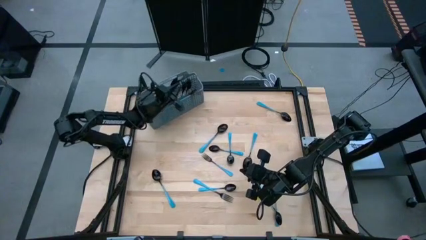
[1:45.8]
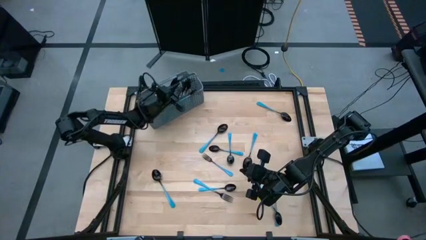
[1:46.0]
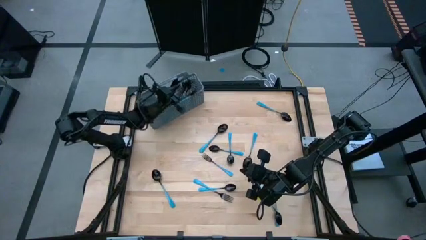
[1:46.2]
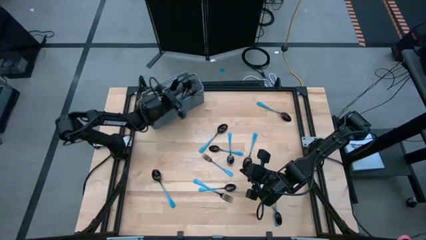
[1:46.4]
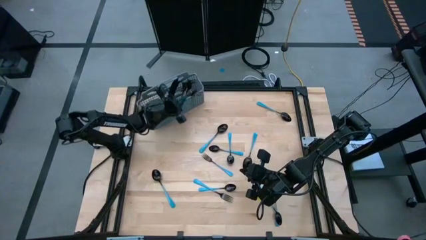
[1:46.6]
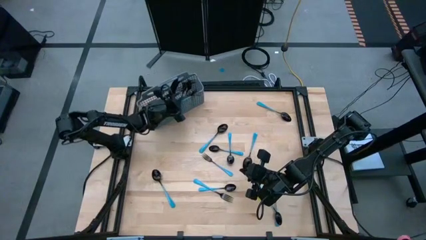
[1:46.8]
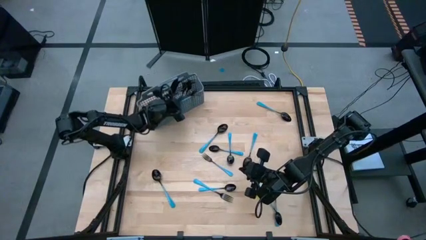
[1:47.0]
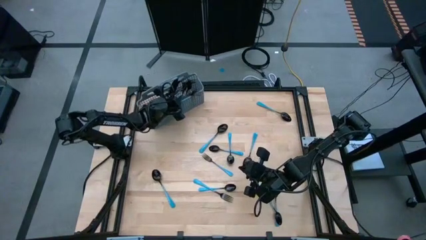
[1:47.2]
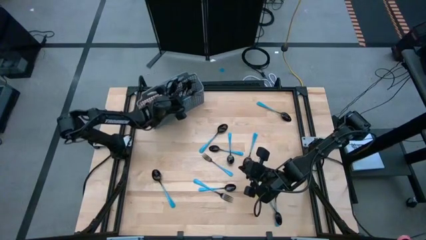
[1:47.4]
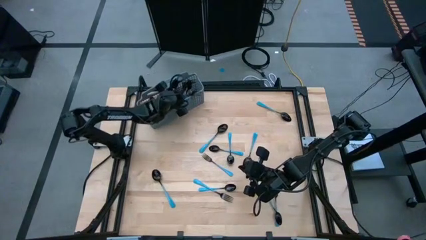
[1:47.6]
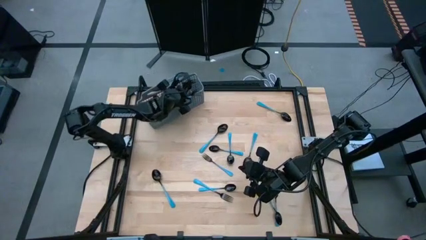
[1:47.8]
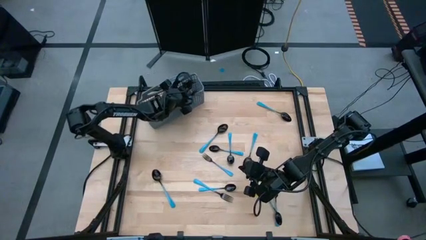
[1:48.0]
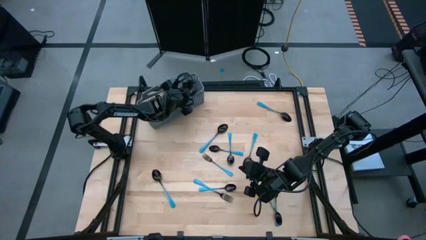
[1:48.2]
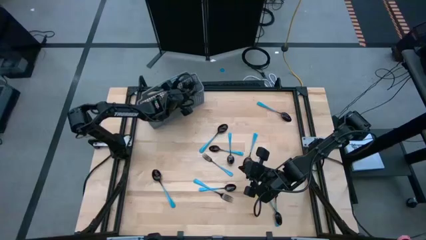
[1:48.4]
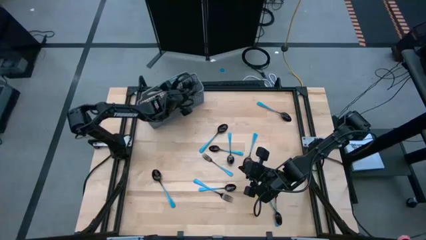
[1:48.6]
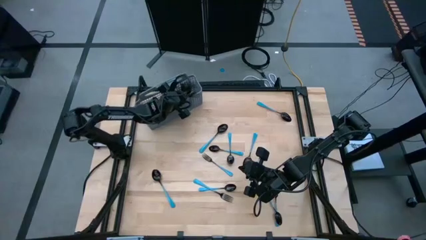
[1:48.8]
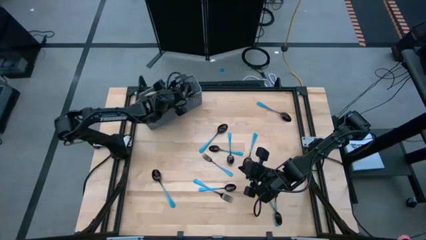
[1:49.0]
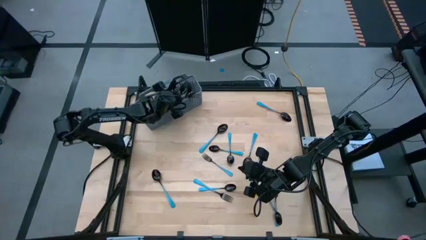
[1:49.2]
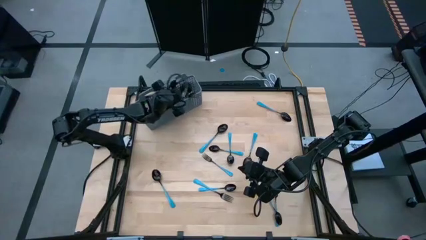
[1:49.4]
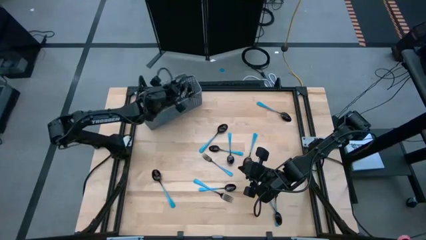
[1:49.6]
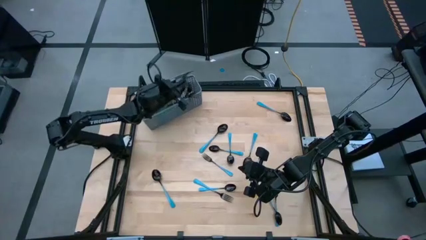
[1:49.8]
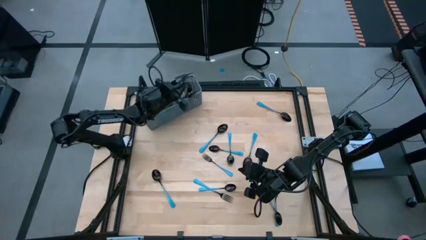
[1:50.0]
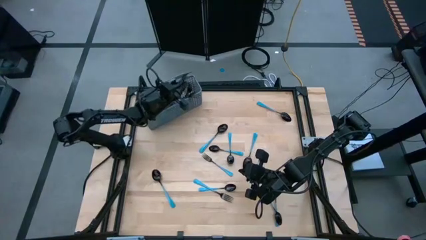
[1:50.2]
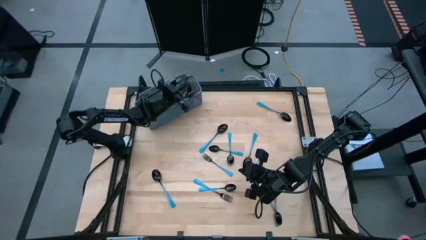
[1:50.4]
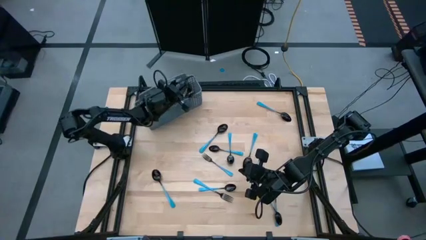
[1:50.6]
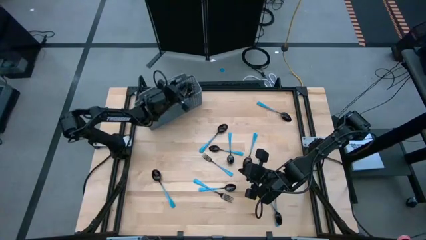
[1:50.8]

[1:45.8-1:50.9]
Task: Sort silverware
Put the blue fork in the silverware rack

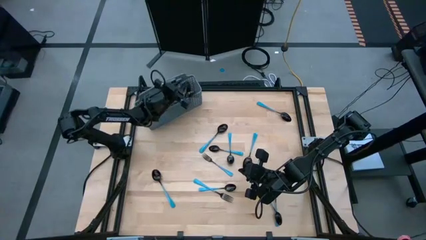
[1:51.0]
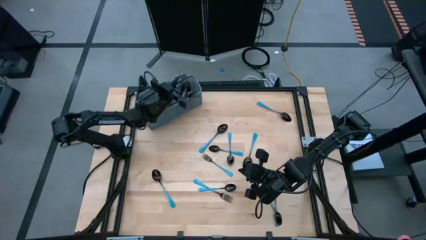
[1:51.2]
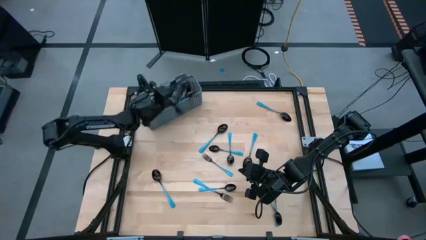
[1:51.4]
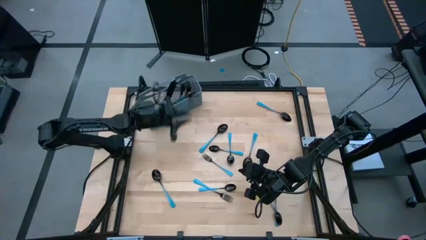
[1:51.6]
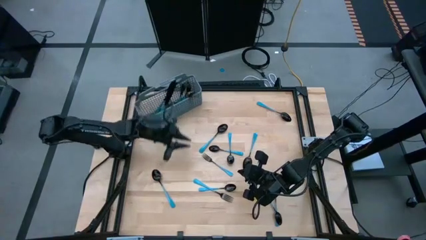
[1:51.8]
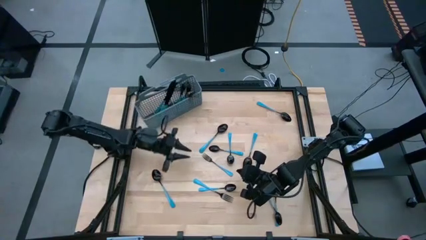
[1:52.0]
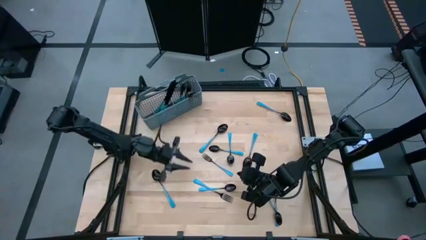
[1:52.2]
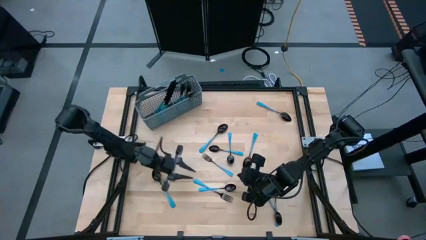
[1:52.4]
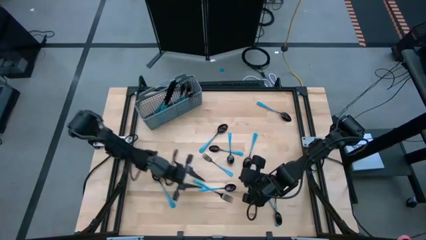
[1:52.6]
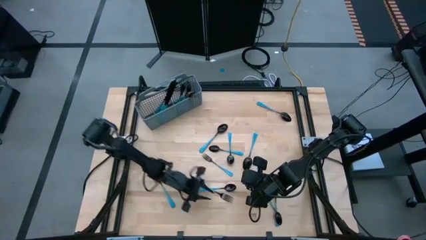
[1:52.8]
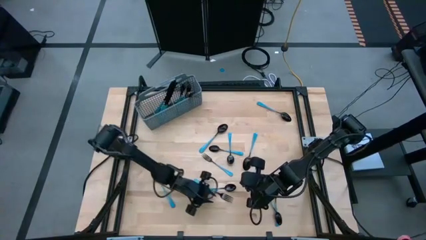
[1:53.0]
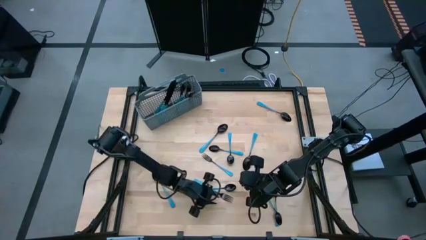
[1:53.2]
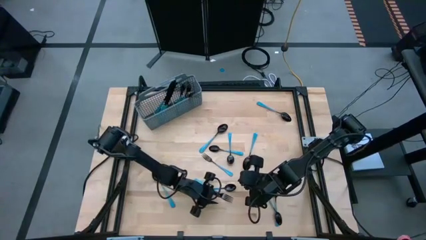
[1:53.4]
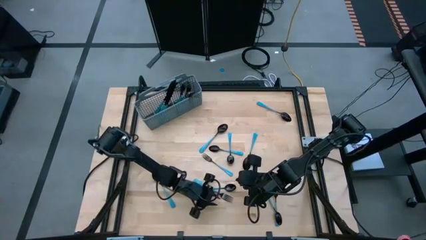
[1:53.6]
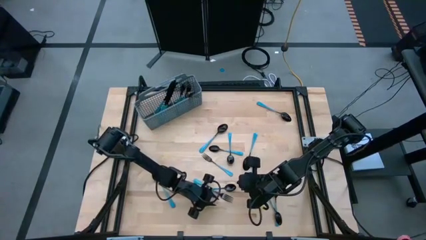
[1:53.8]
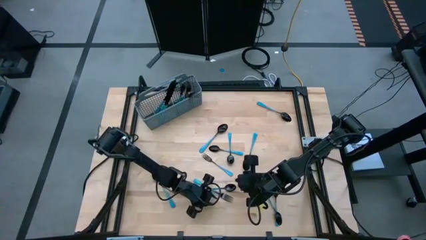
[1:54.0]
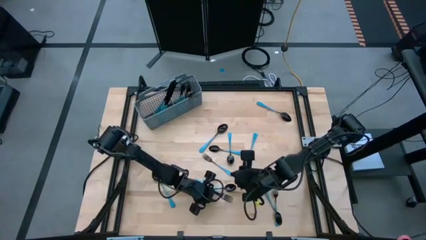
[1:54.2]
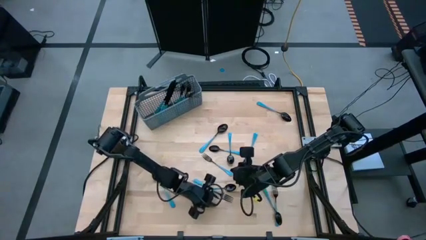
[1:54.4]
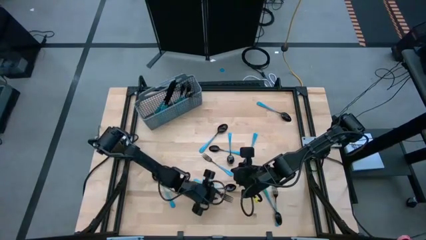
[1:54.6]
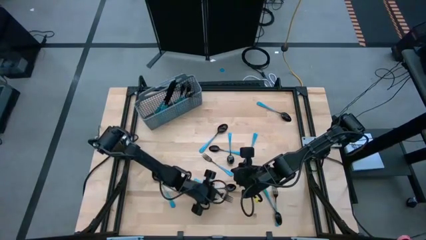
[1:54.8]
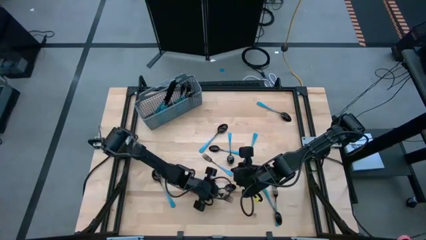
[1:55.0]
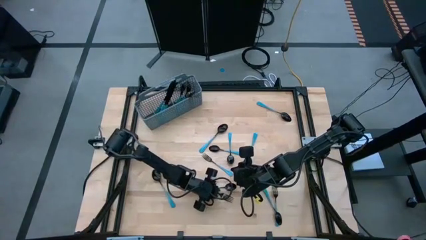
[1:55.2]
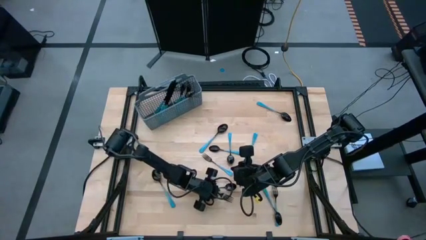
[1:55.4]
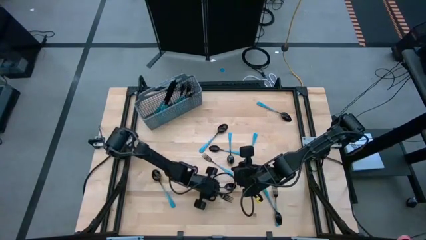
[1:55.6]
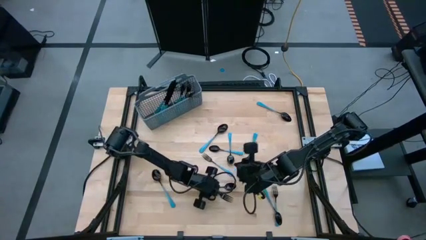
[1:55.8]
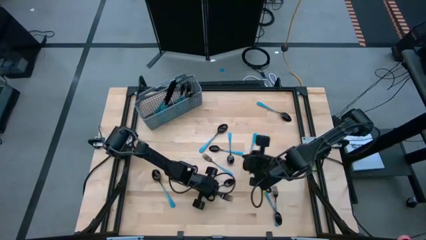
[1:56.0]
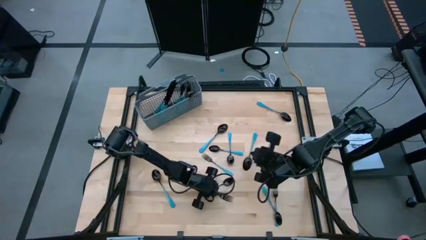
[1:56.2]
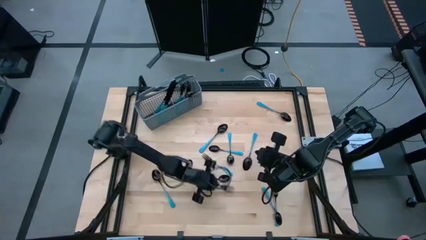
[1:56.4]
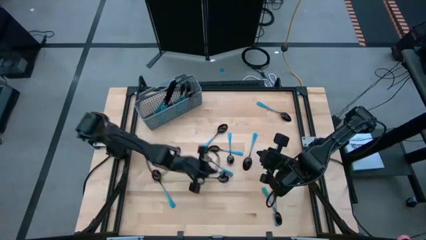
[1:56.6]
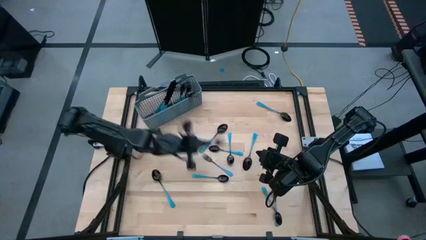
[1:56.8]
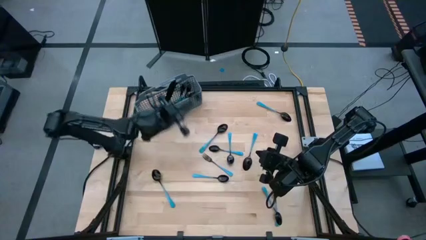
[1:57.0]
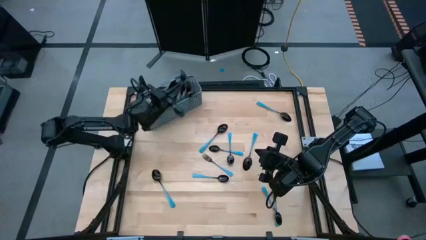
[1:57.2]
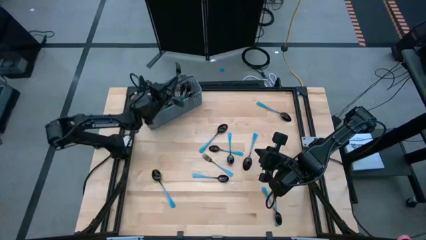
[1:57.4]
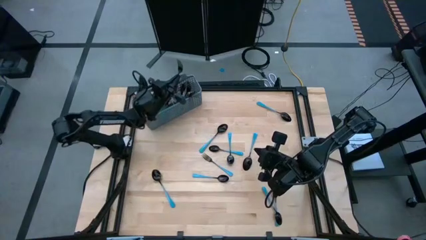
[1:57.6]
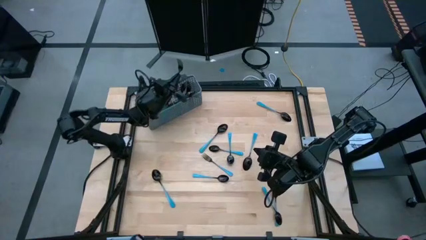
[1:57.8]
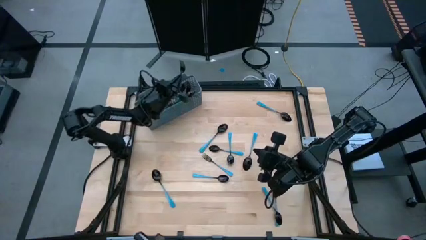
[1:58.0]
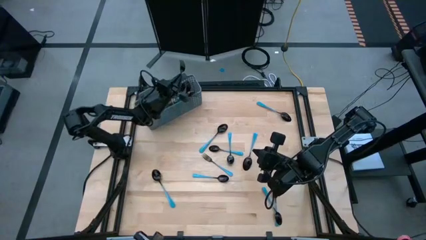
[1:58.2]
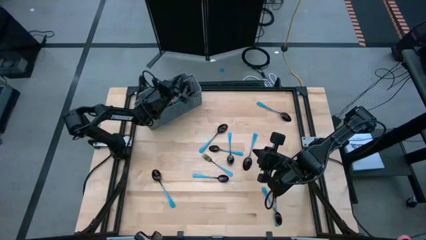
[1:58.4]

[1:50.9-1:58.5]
Put the blue fork in the silverware rack
